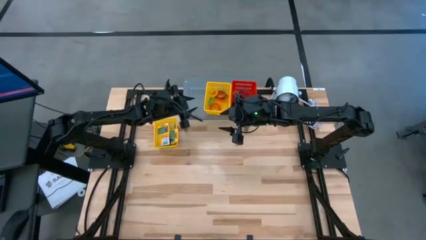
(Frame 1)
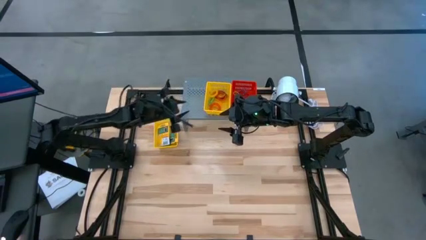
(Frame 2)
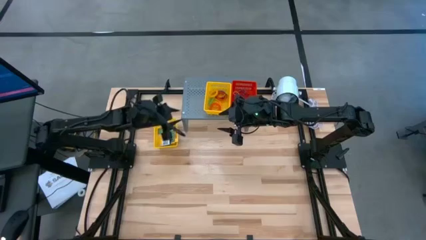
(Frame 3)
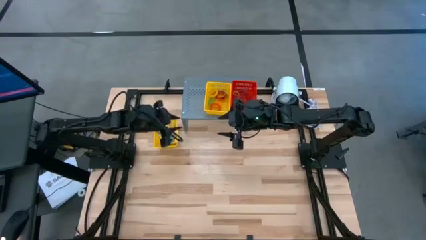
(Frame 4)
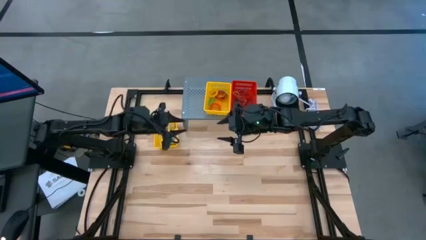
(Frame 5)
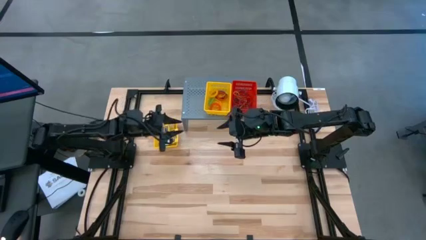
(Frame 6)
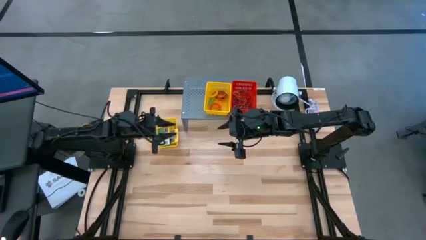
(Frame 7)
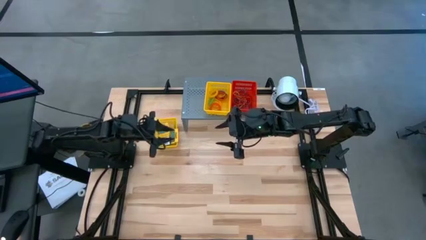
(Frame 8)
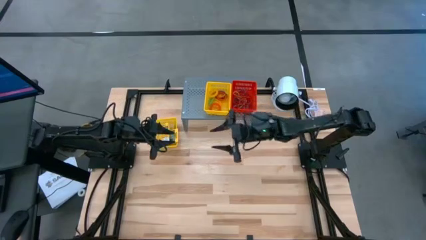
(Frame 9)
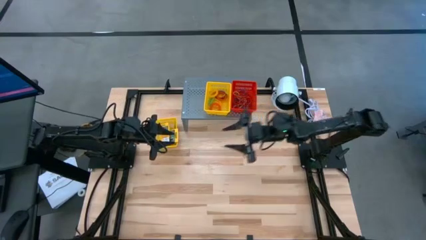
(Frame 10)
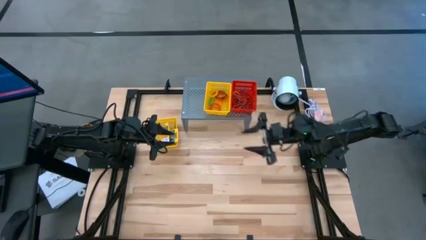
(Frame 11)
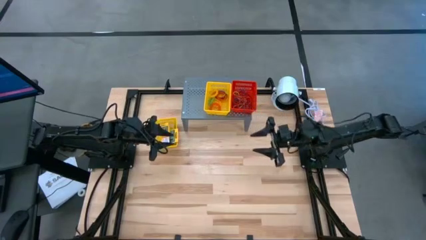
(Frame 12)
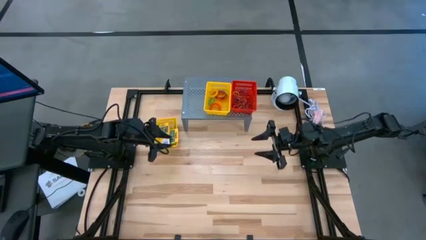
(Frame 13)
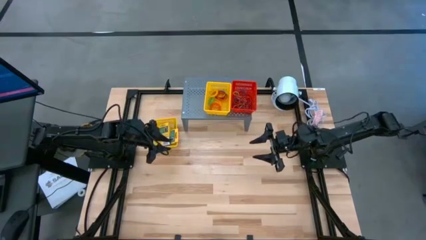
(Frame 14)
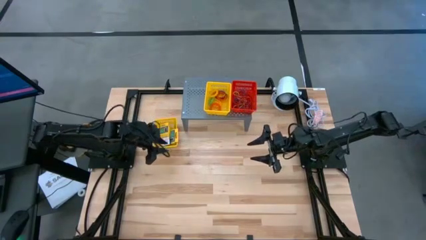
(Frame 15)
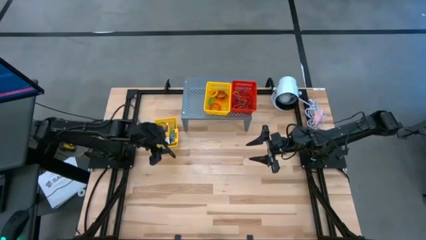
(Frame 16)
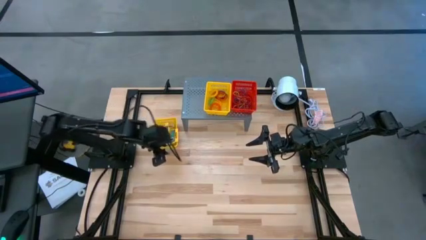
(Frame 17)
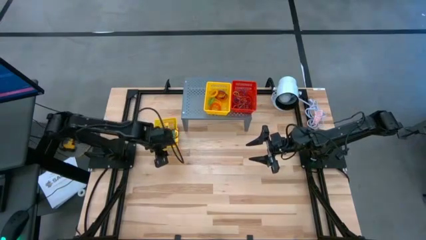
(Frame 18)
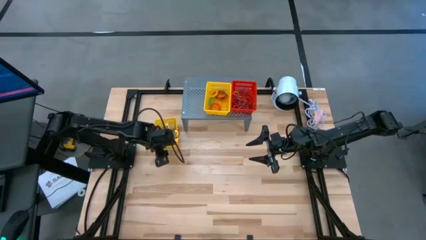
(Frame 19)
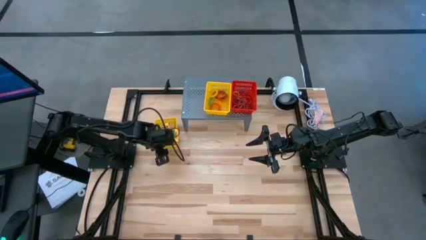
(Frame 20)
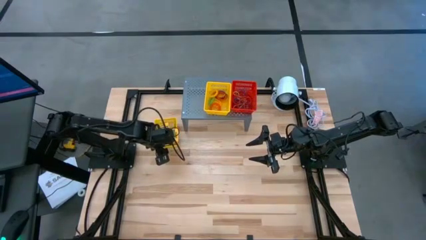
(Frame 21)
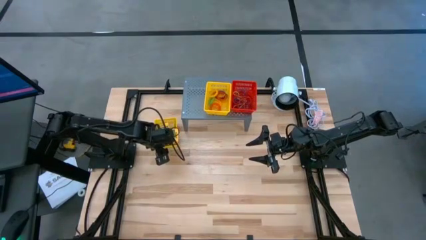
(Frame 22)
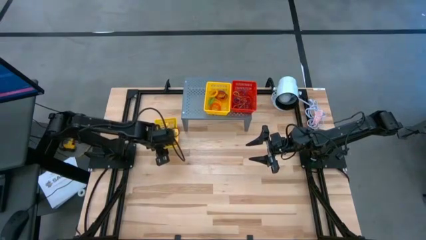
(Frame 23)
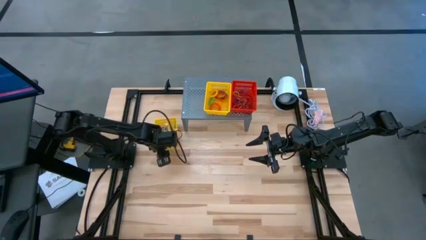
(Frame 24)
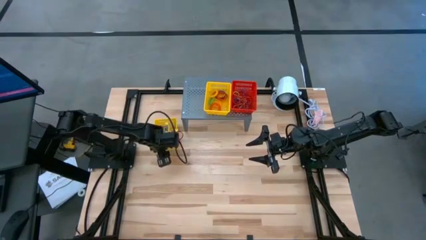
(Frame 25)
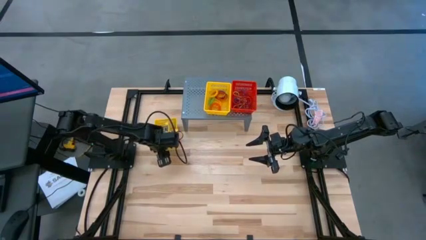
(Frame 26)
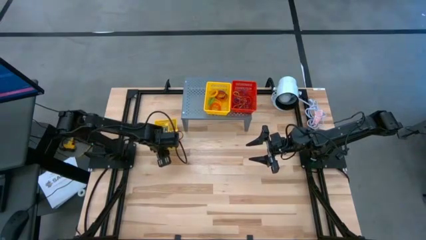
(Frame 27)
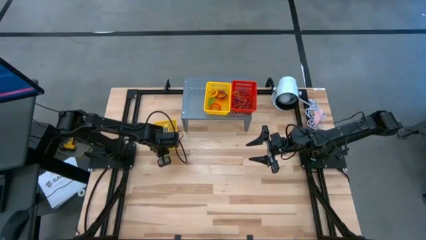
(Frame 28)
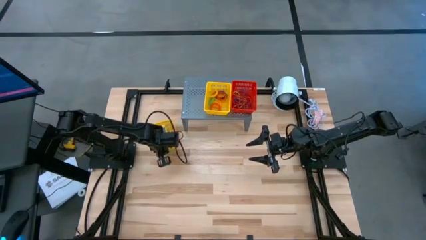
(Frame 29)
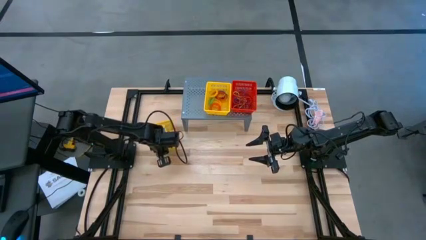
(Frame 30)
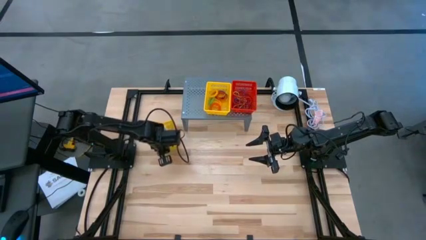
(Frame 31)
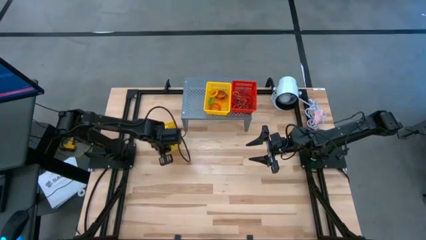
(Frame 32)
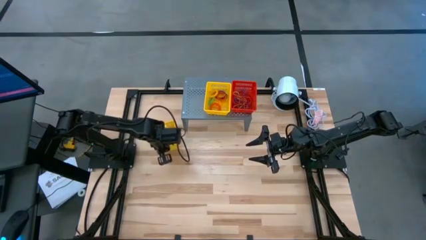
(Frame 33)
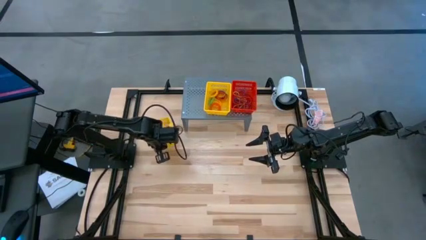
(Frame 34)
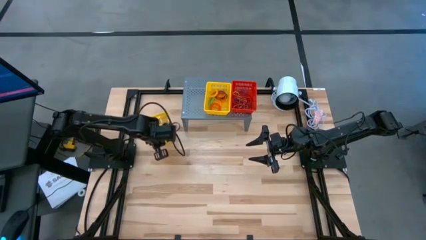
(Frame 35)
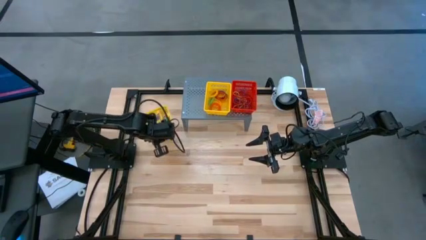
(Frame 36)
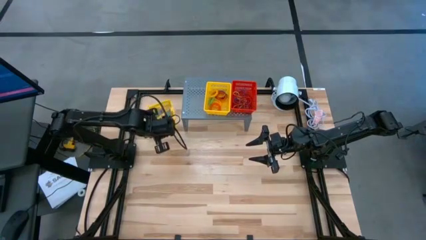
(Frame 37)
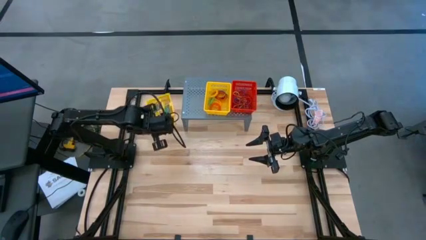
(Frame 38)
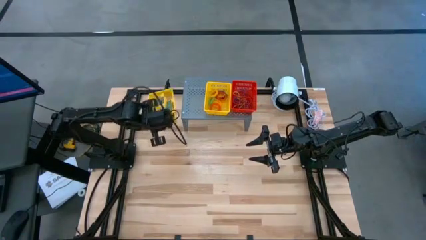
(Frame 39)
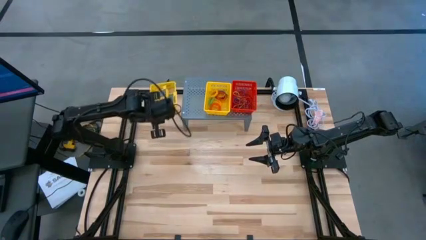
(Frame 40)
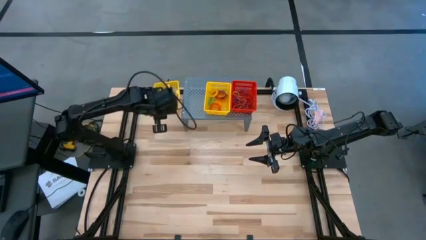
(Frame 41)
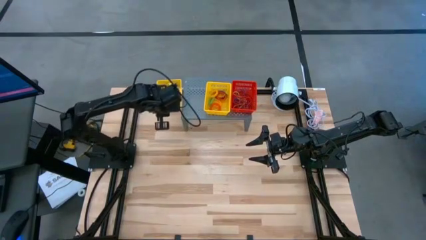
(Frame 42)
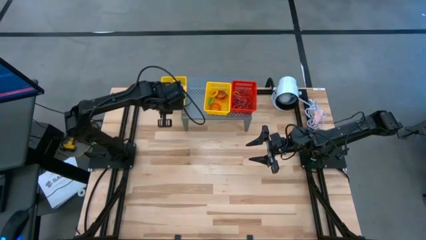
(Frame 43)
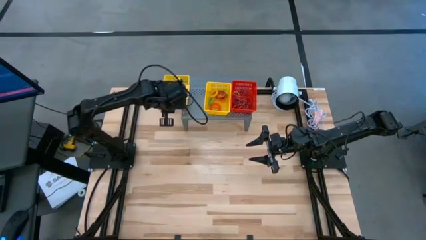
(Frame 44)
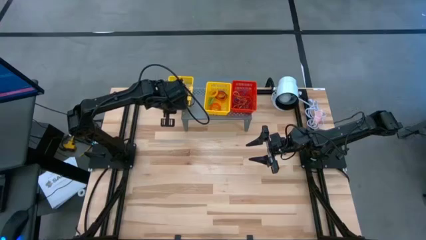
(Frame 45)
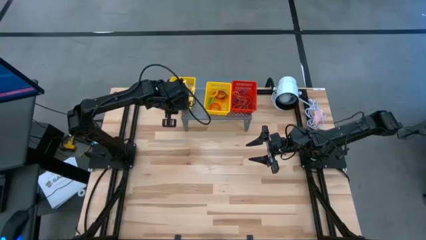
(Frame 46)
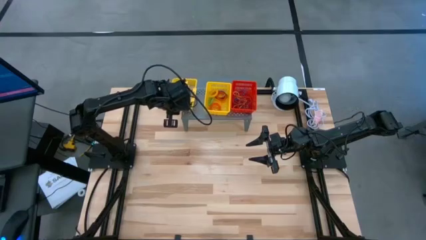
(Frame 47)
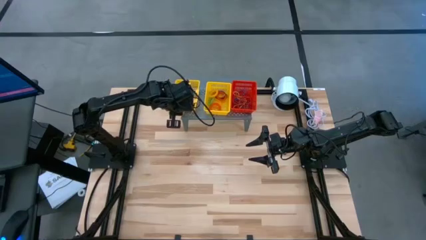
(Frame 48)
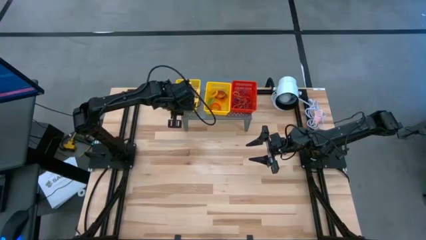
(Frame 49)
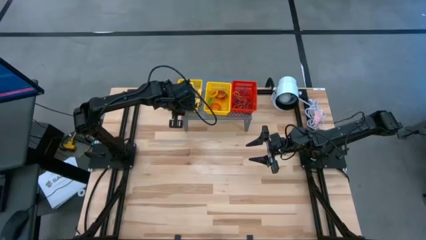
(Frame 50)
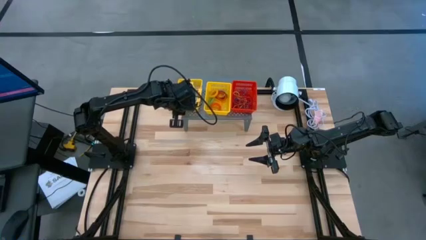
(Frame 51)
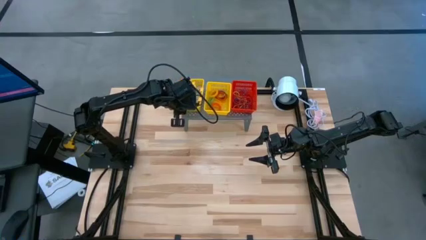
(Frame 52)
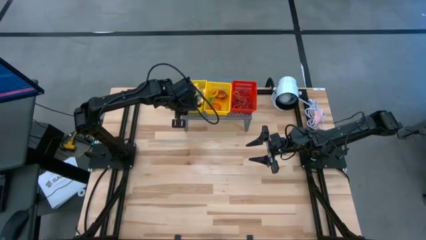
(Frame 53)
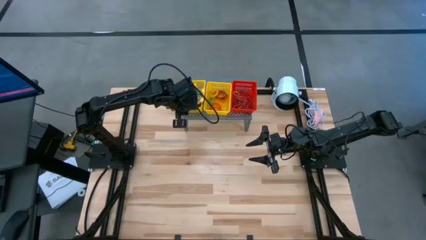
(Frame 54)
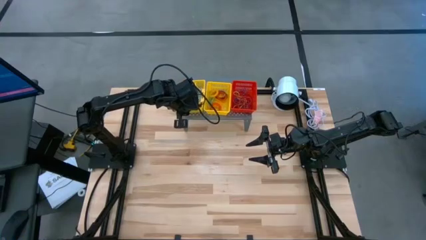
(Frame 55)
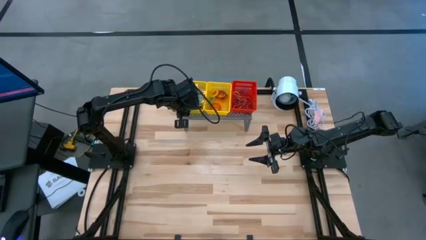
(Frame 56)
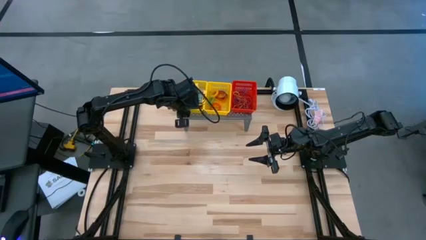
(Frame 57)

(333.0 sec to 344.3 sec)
Task: Pick & Place Office Desk Supplies
Put the yellow bin filled with crayon boxes on the shelf
